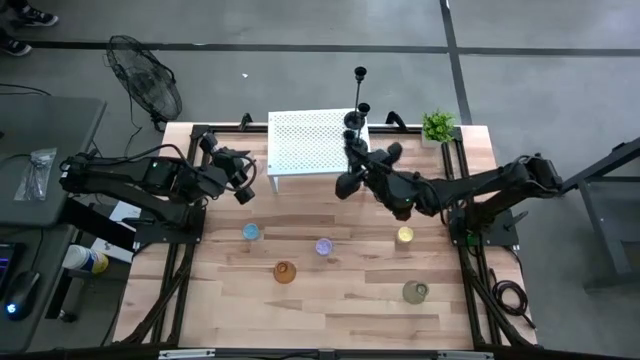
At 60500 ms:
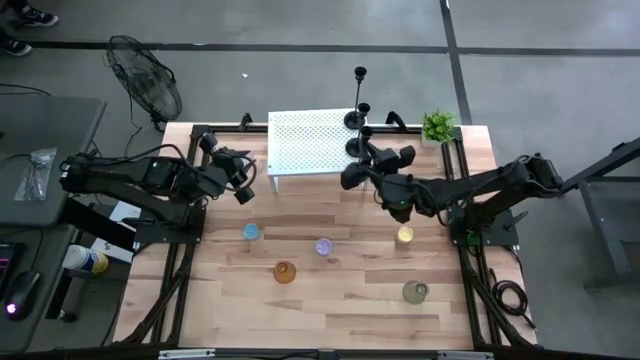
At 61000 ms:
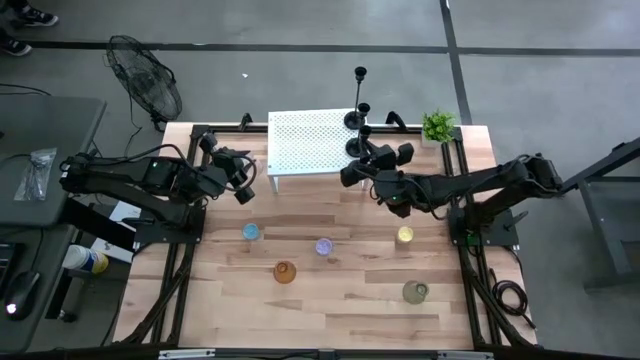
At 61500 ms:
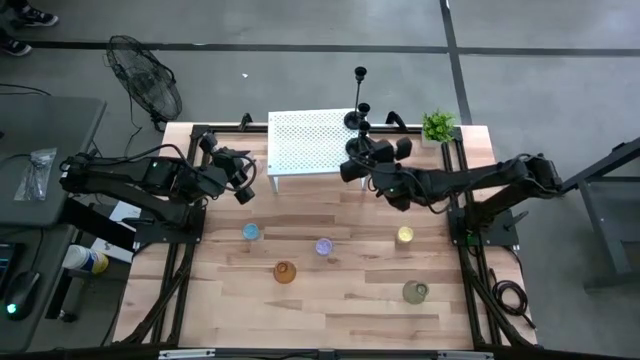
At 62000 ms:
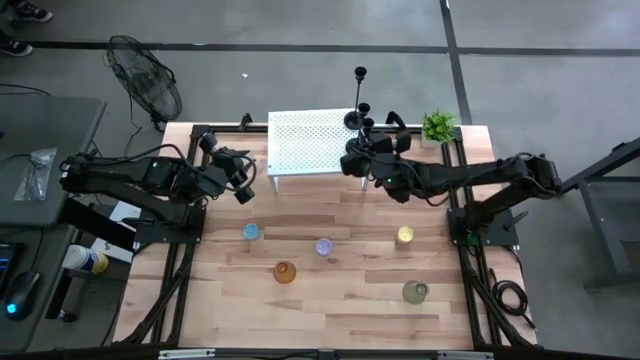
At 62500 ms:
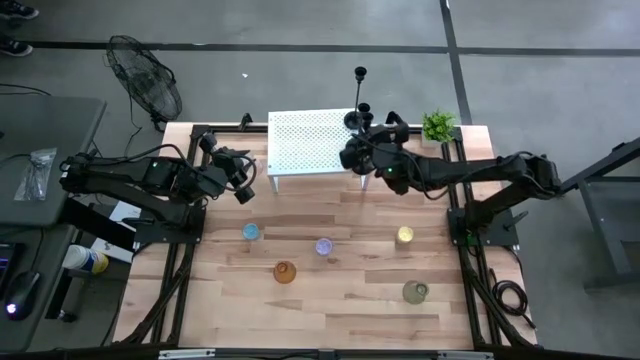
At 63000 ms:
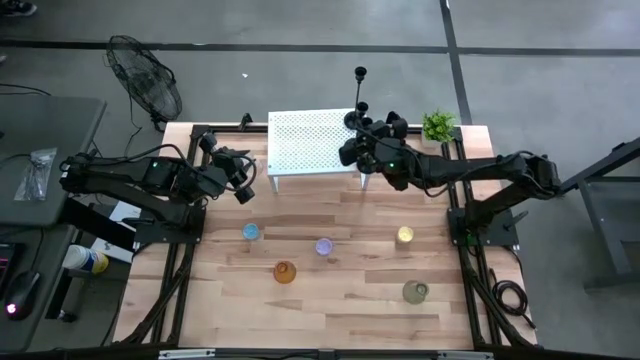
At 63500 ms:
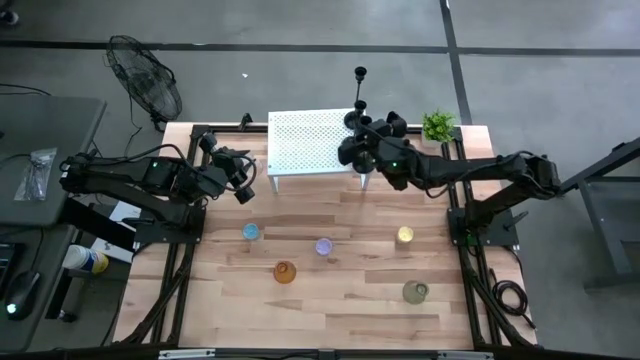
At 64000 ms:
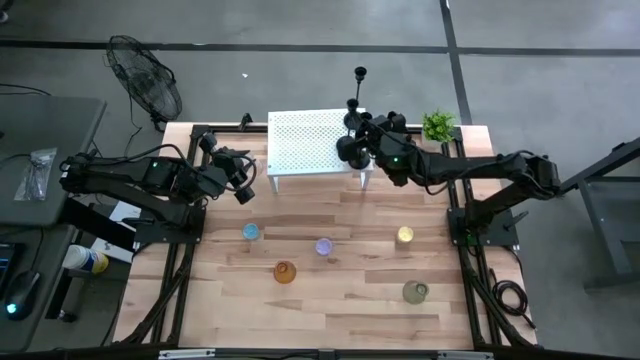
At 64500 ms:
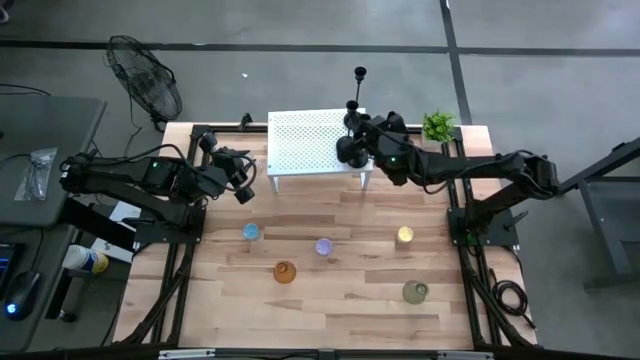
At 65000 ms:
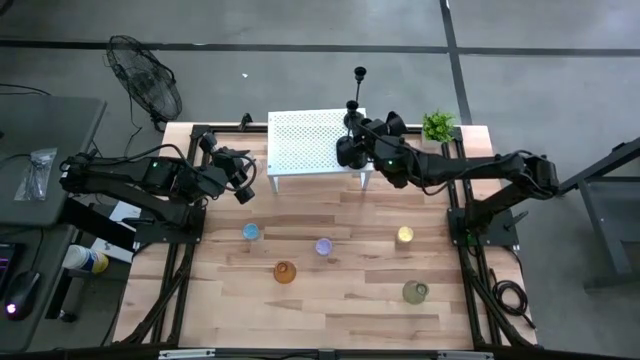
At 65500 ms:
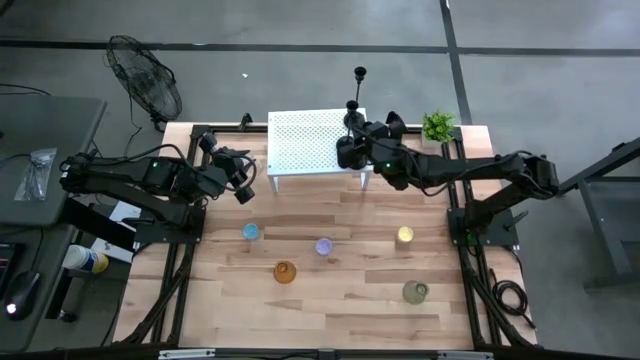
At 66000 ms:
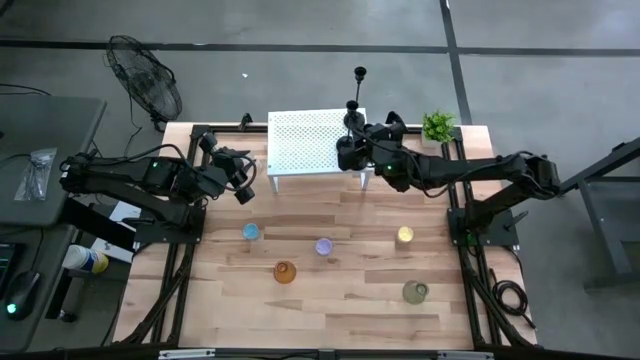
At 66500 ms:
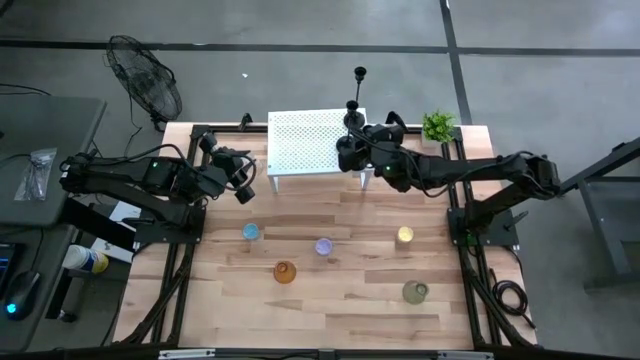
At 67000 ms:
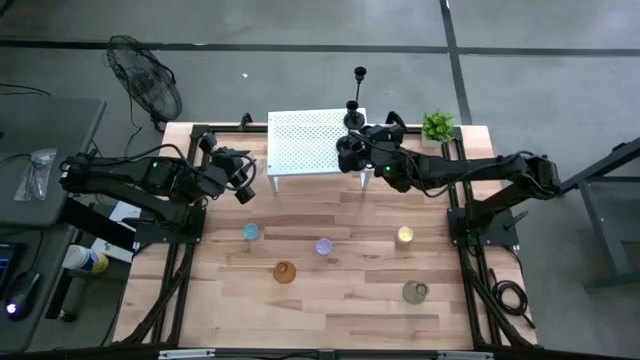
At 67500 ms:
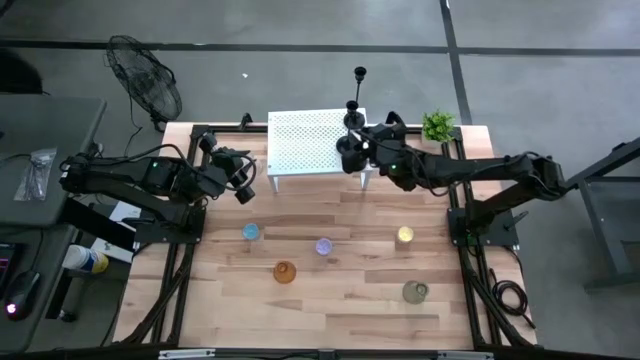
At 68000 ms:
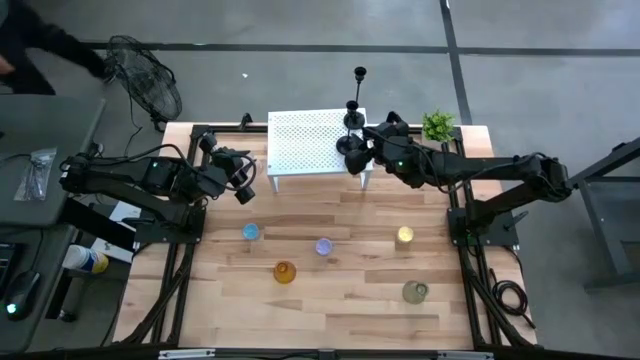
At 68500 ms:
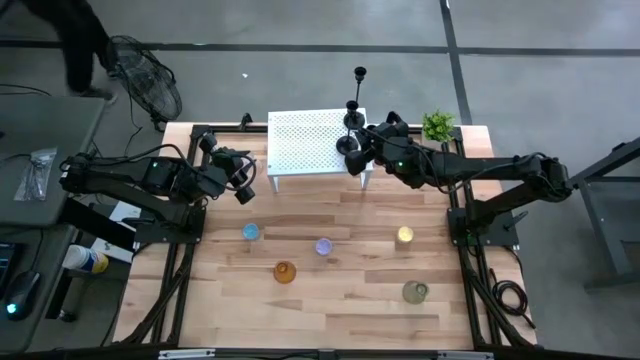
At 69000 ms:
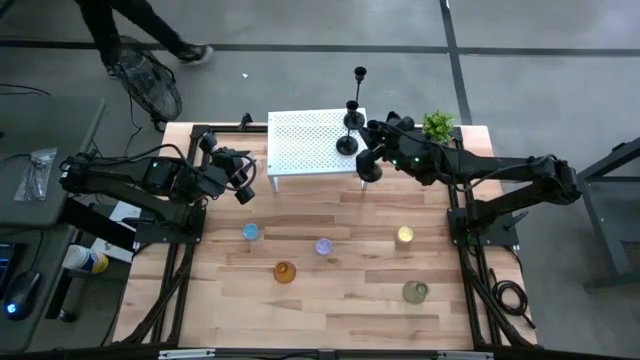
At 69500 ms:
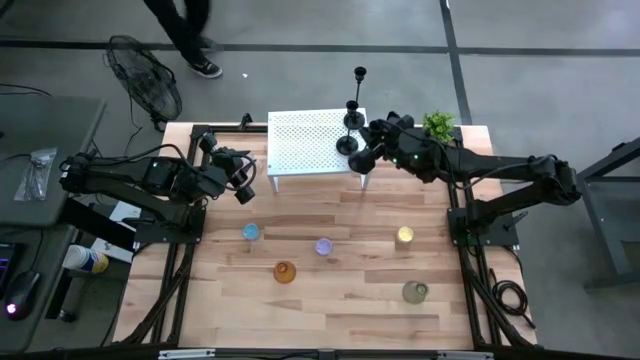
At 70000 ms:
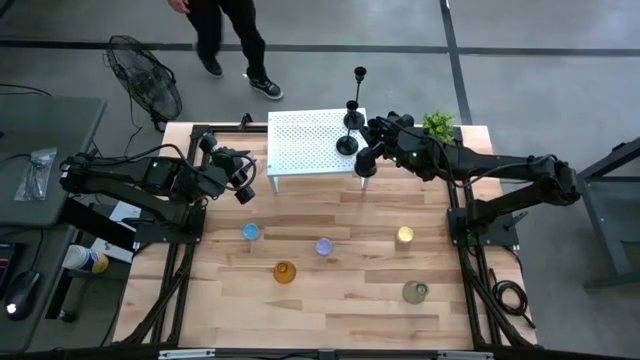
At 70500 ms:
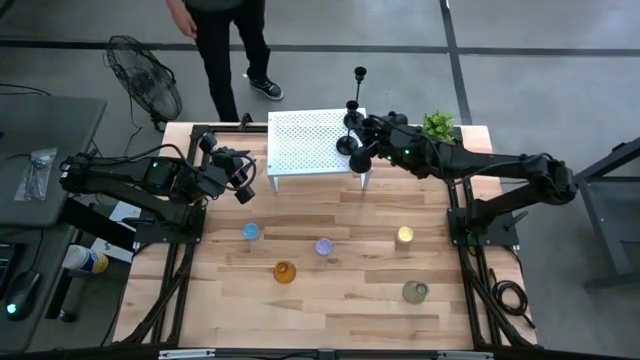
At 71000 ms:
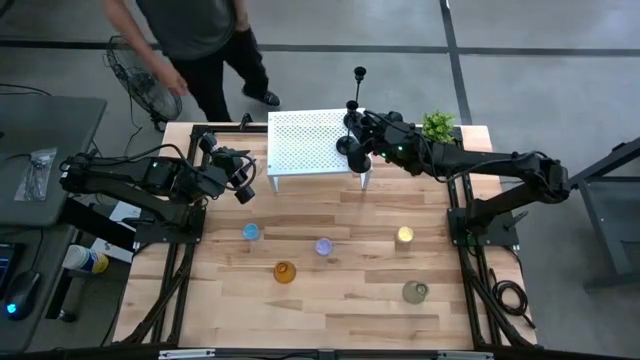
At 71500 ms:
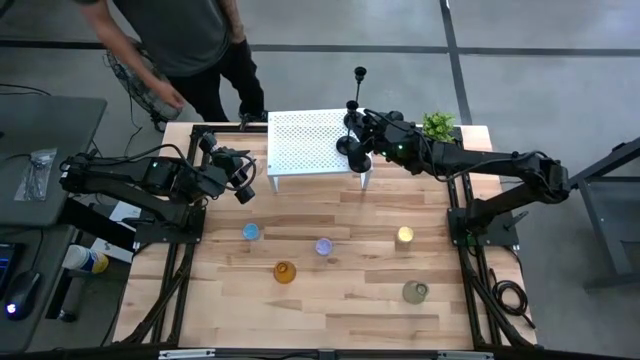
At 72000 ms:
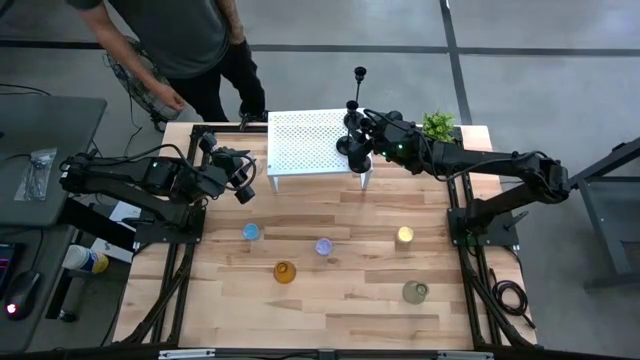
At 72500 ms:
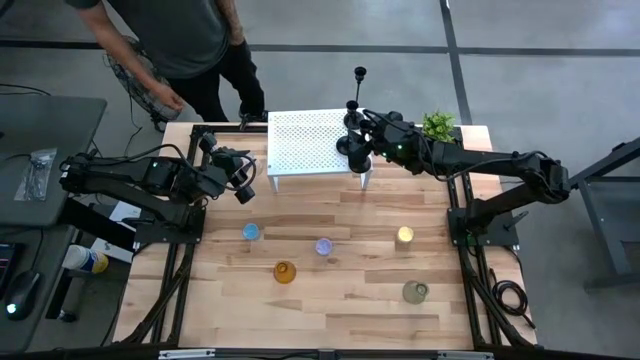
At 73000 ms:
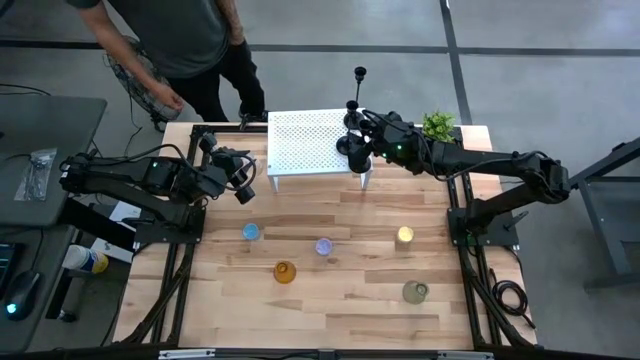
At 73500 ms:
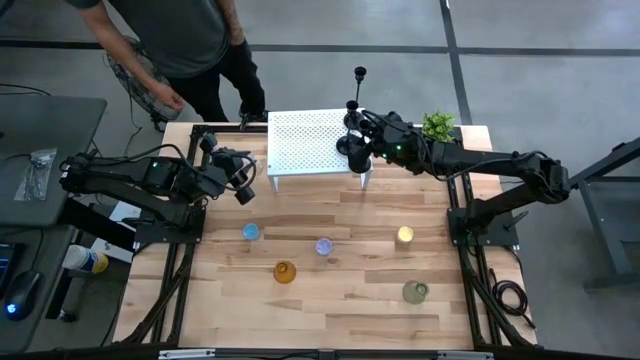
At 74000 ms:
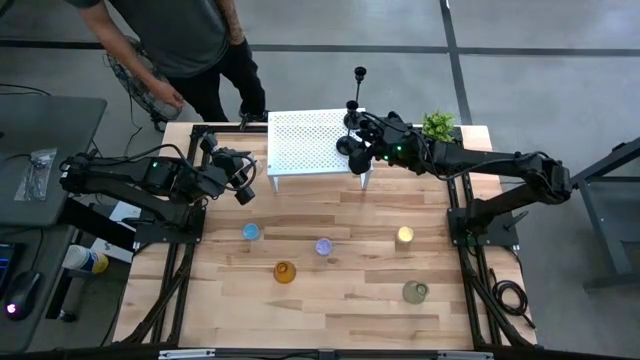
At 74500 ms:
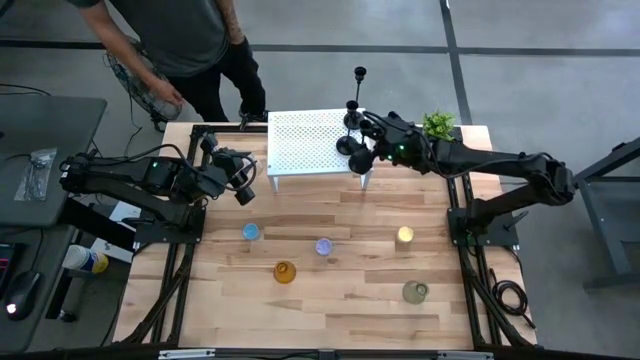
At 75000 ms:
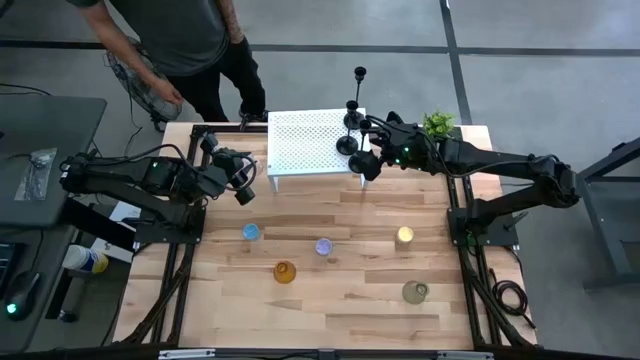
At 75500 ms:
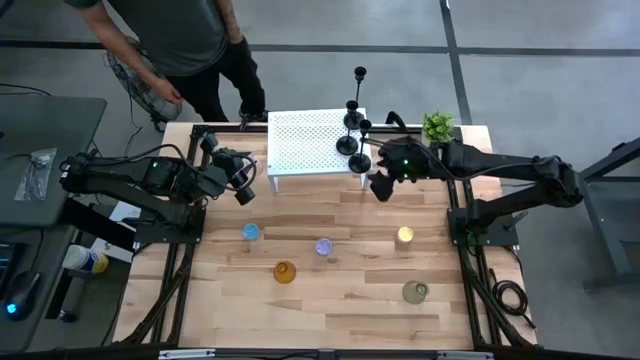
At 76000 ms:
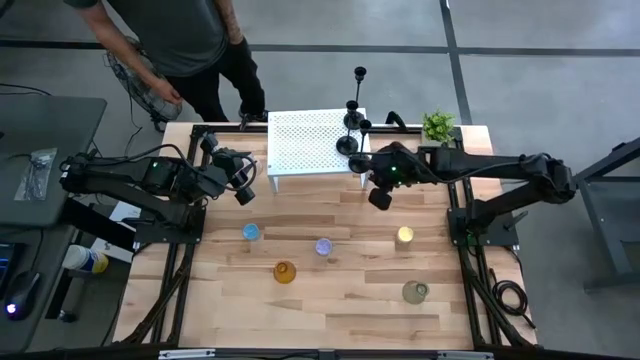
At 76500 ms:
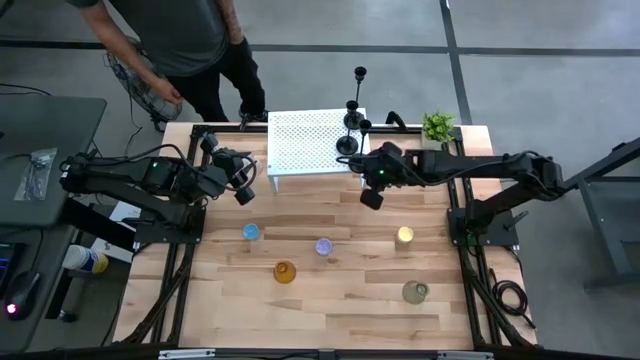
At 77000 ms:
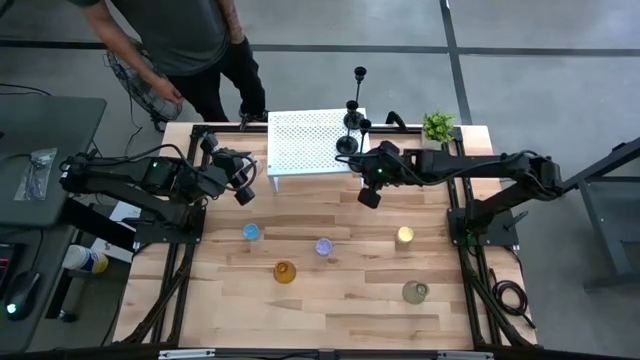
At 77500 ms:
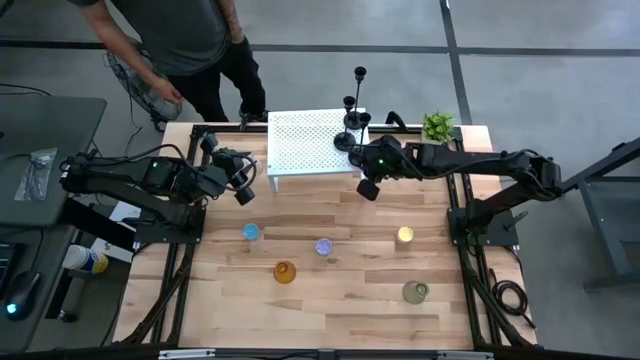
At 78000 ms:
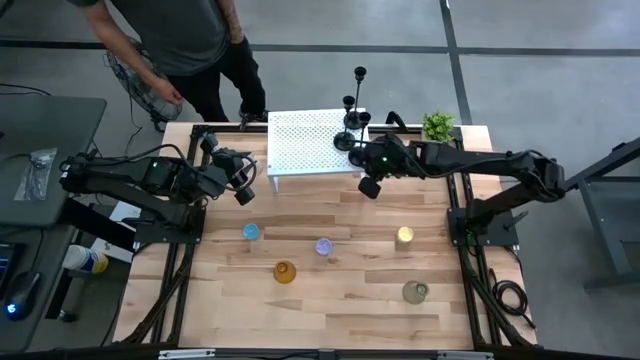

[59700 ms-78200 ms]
Task: Pick & Place candle stick holders
Put the black candle holder on the shelf

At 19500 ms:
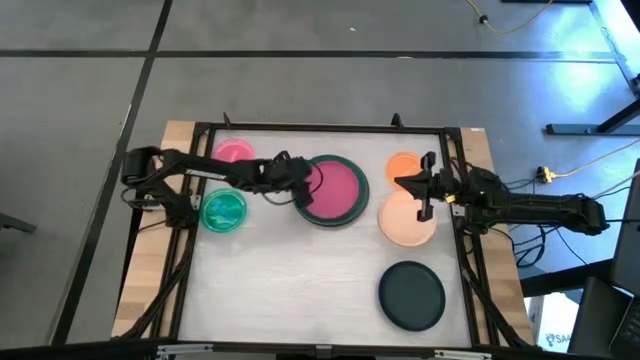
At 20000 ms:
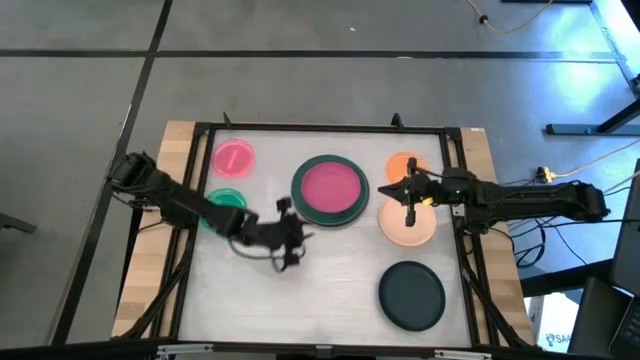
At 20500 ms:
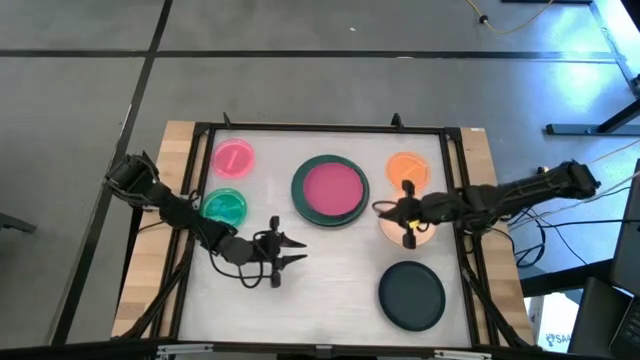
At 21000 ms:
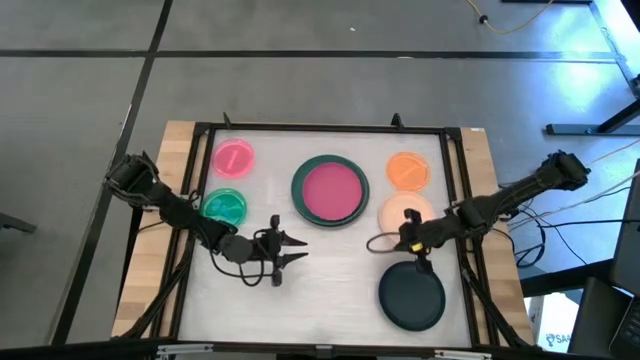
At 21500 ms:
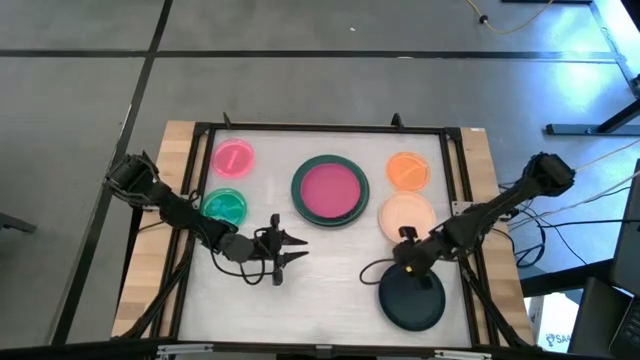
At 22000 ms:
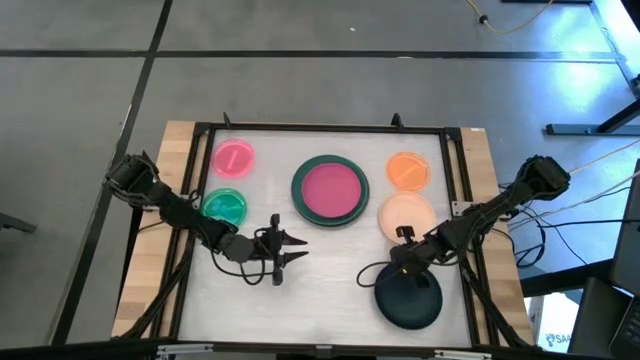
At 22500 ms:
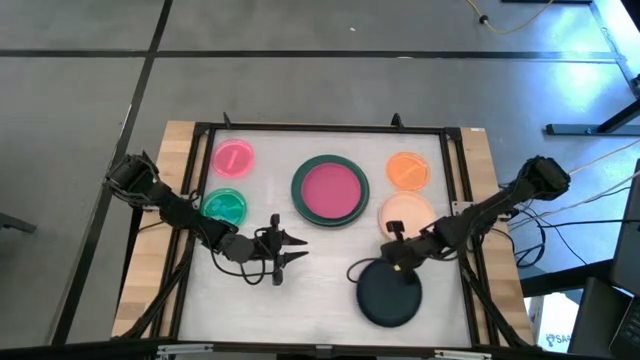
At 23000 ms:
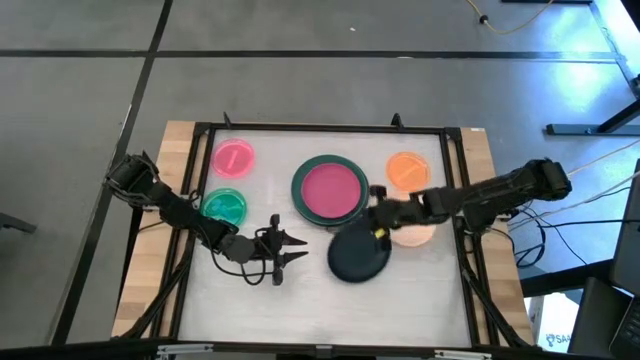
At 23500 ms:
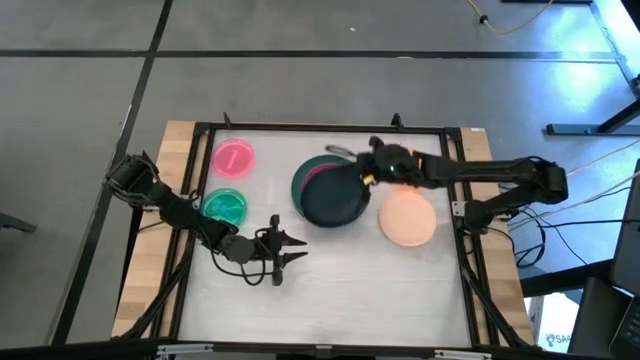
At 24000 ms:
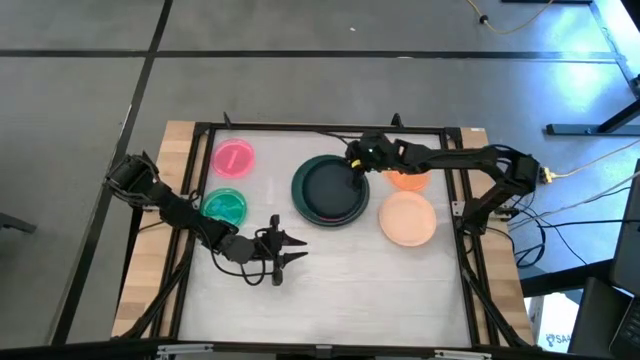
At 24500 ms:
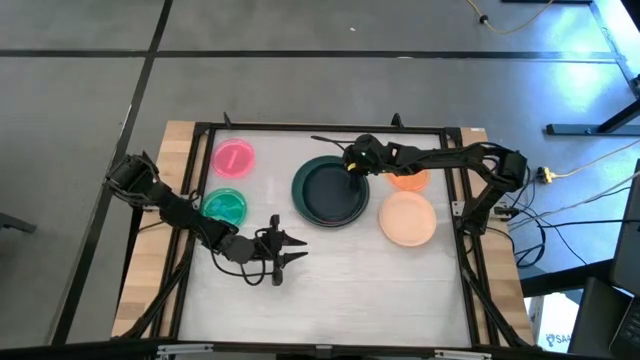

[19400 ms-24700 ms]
Task: Stack plastic plates
Stack the black plate on the pink plate
